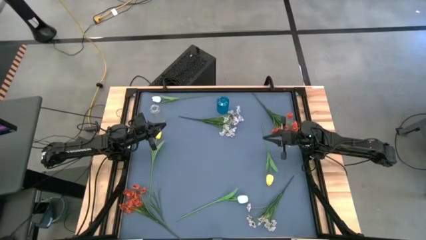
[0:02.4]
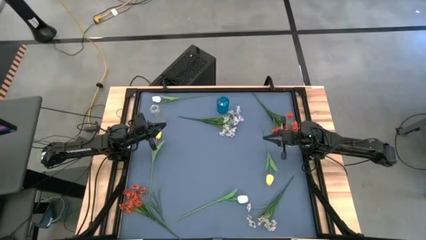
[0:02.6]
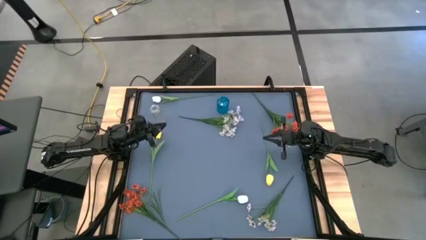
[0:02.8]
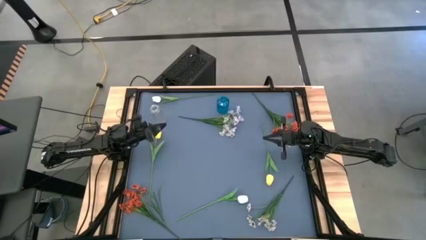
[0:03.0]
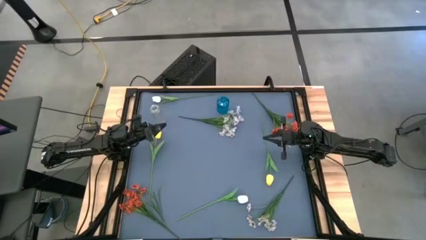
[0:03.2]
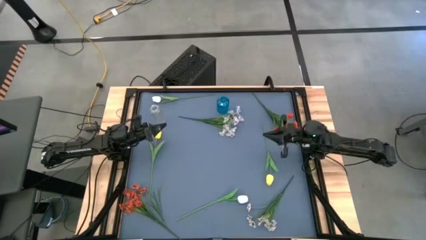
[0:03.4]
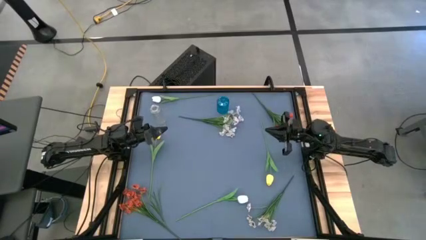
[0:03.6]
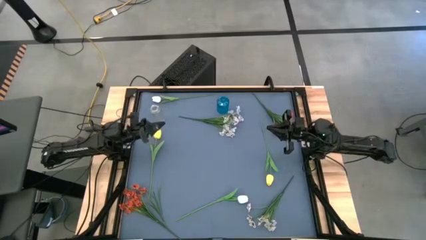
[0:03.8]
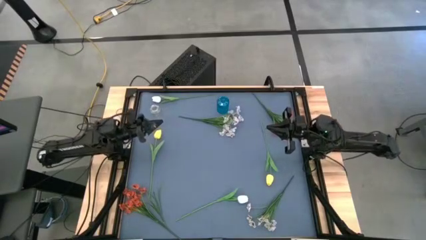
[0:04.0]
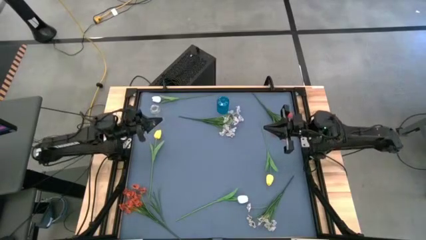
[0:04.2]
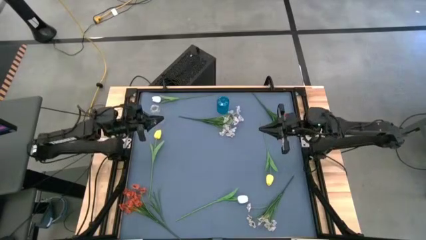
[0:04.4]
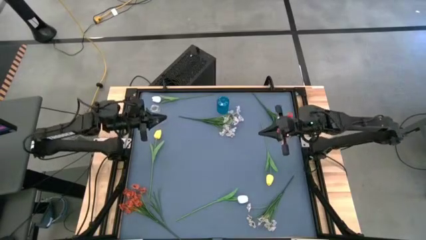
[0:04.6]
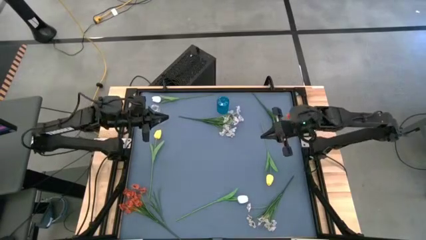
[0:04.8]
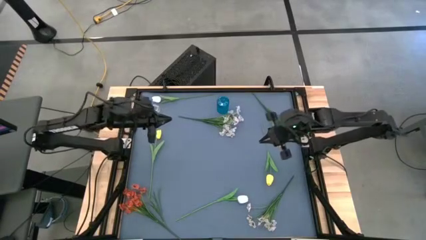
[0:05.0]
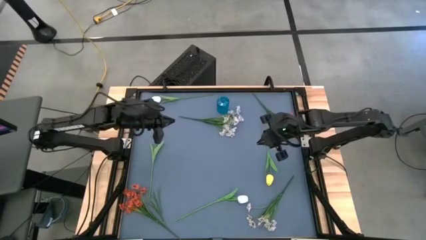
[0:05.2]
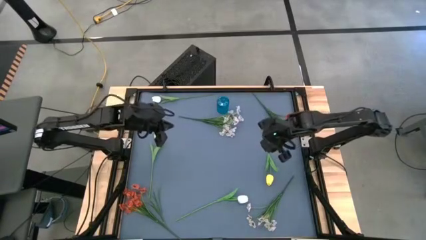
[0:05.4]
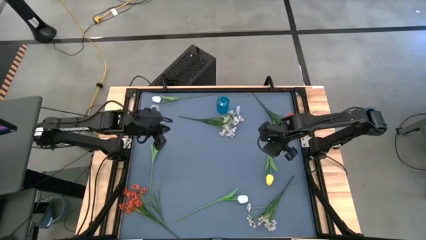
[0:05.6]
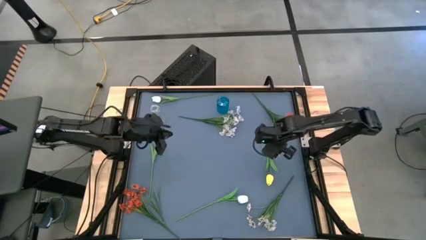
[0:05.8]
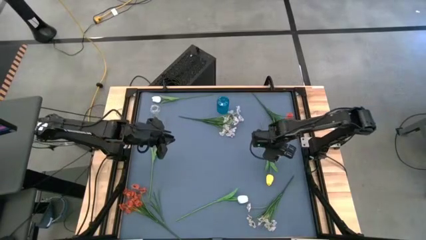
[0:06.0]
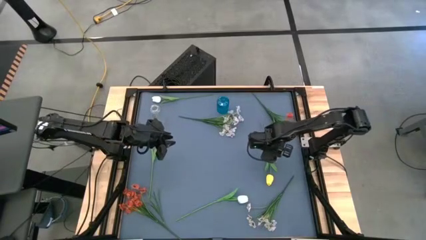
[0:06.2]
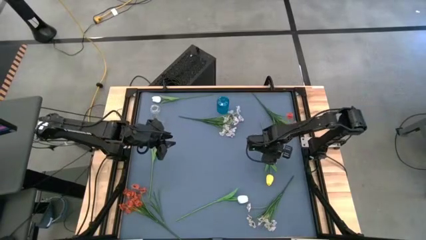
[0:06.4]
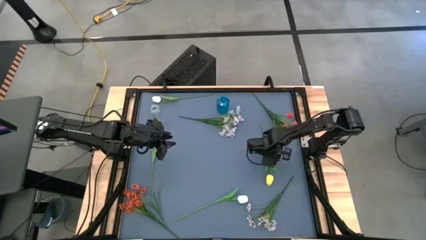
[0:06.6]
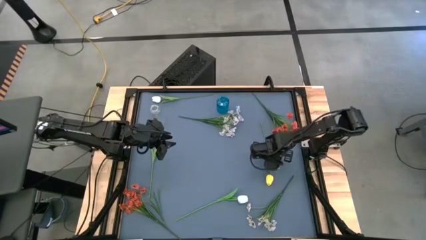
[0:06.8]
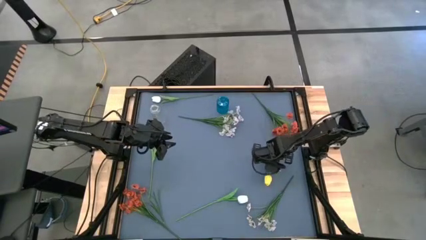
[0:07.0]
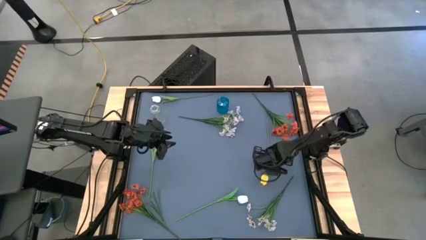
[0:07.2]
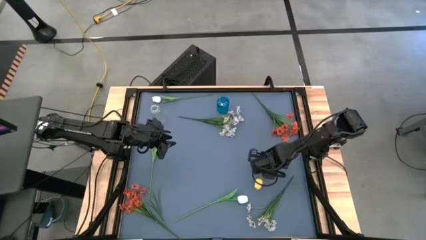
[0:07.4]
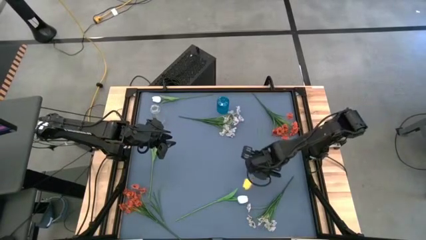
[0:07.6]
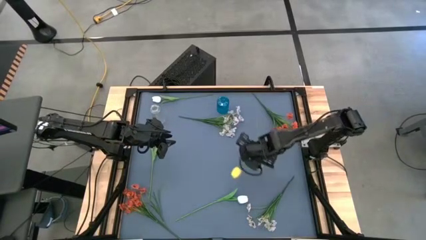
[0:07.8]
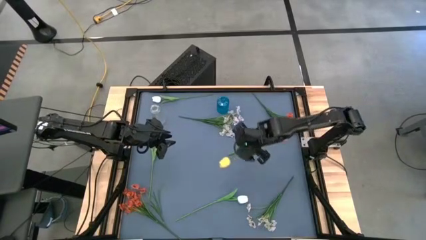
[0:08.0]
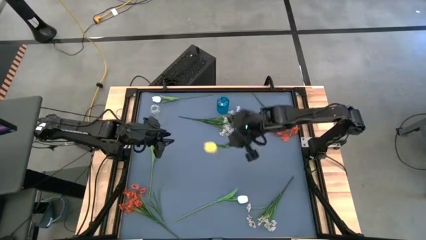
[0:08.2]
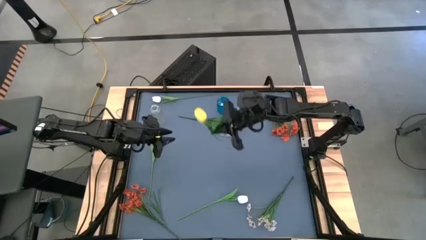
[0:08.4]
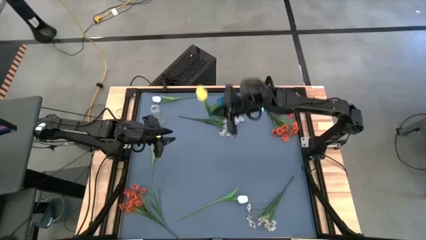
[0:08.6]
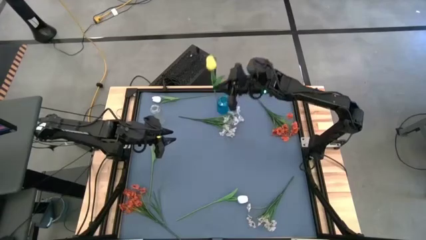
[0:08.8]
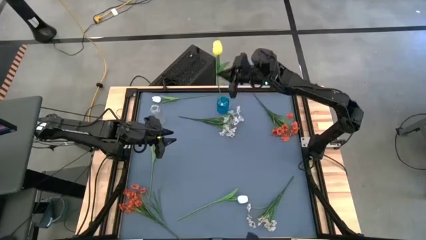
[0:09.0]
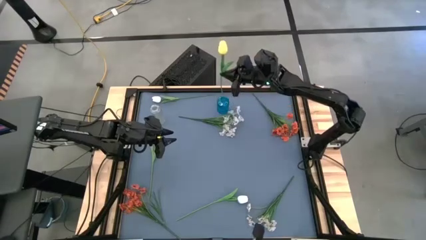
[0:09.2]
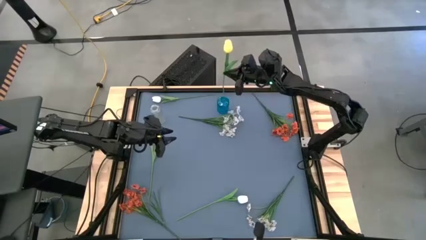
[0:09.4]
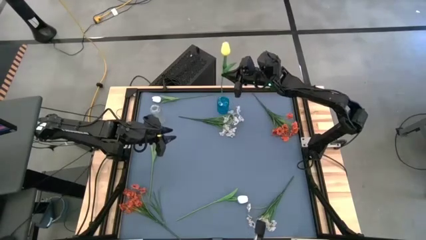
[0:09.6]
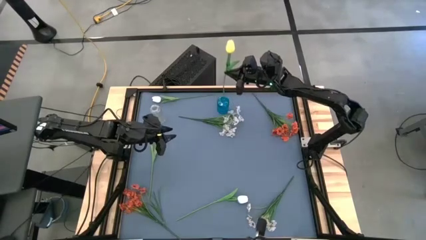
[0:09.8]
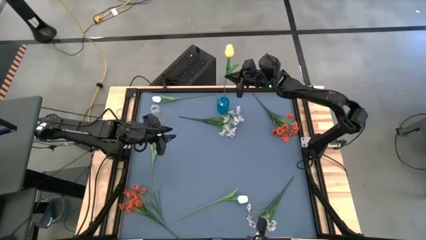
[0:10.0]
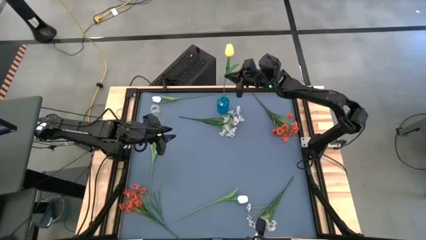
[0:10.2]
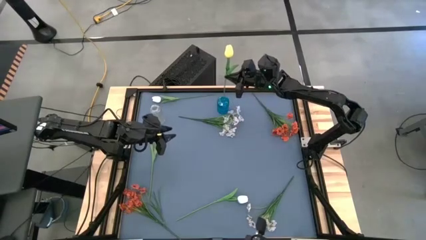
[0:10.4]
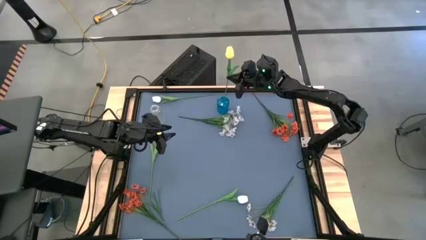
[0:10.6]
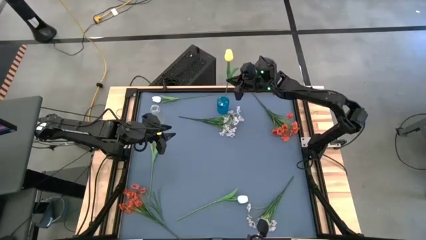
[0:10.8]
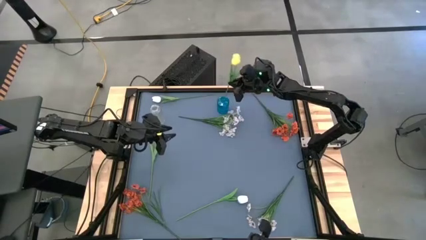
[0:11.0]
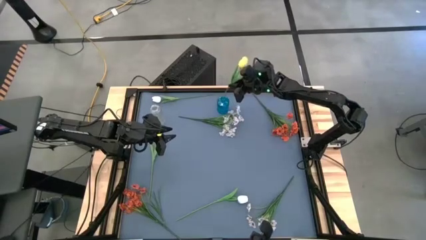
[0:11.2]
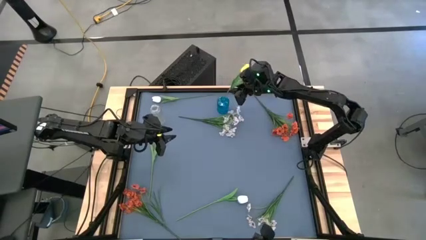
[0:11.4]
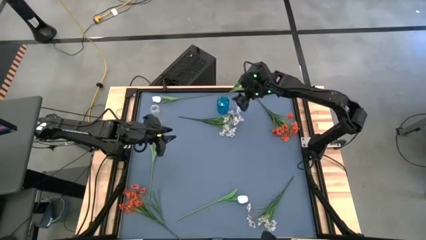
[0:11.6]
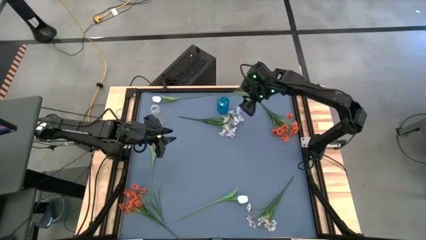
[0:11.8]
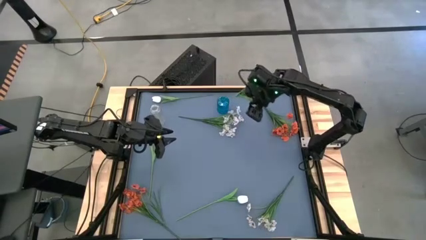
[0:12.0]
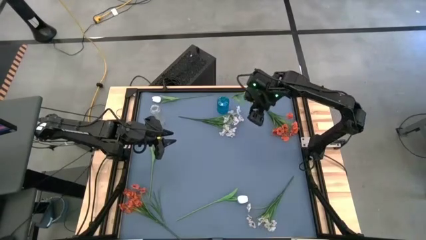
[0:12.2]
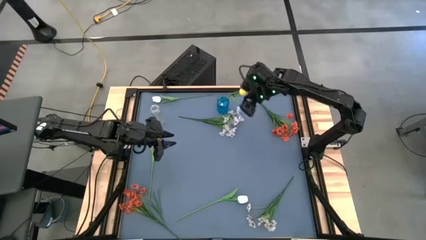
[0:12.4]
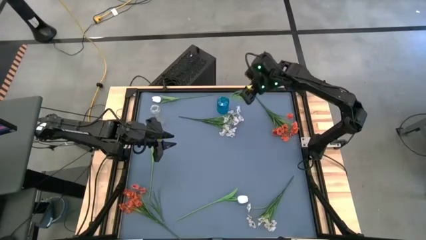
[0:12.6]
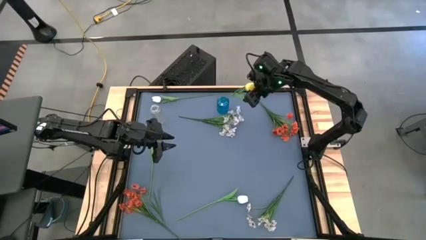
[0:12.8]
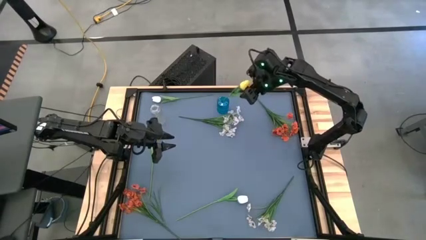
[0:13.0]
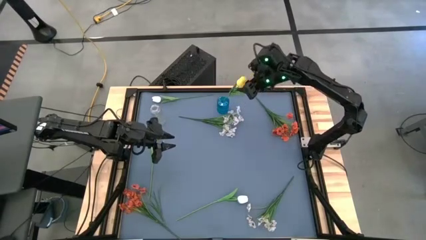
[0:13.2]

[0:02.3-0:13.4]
Task: Sort flowers into vase by color
Put the right yellow tulip into the blue vase

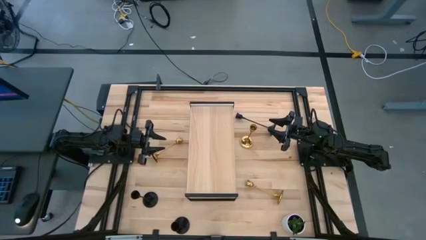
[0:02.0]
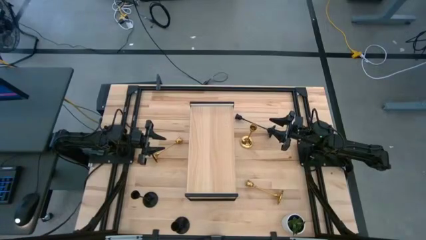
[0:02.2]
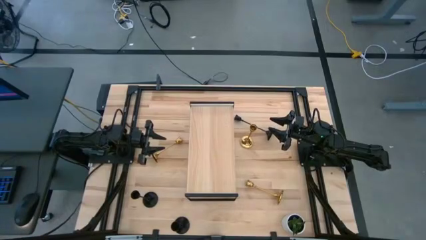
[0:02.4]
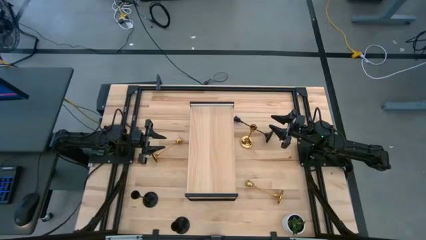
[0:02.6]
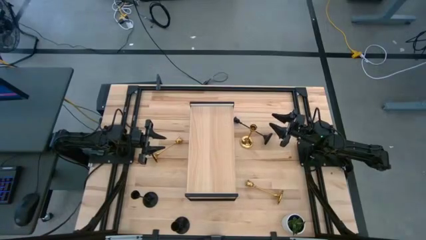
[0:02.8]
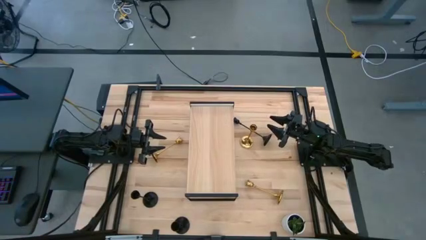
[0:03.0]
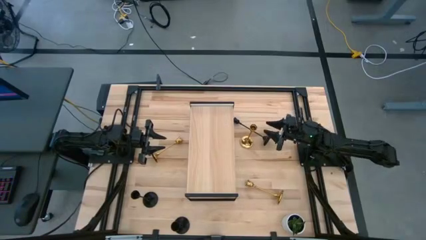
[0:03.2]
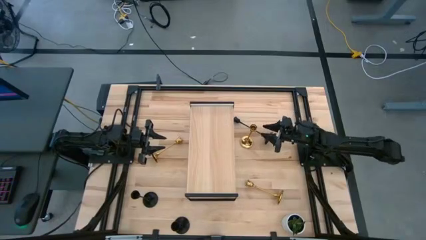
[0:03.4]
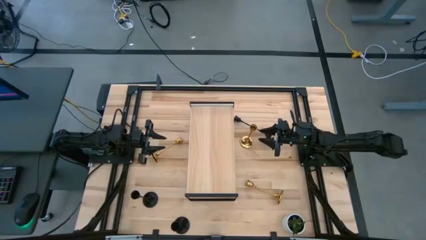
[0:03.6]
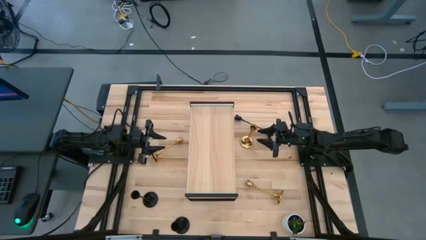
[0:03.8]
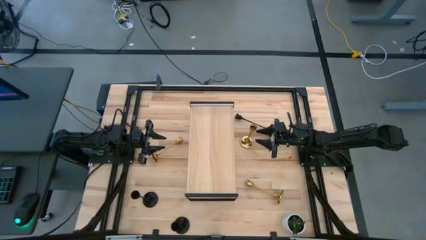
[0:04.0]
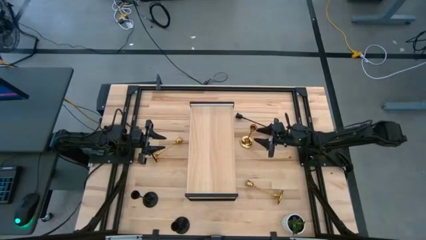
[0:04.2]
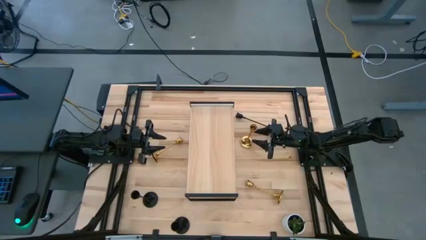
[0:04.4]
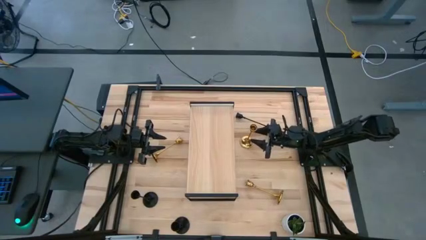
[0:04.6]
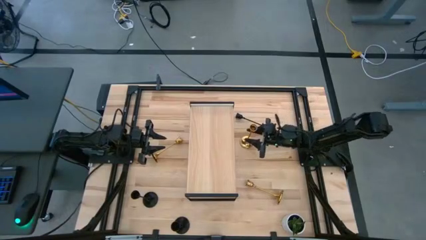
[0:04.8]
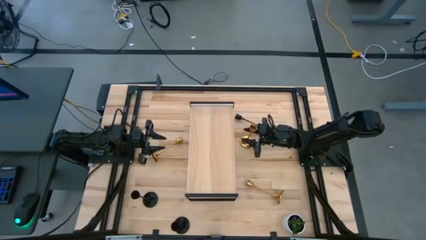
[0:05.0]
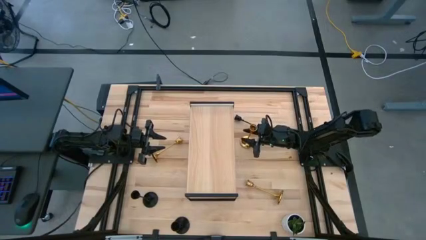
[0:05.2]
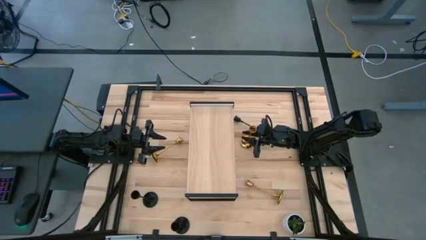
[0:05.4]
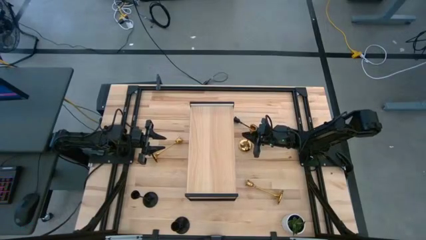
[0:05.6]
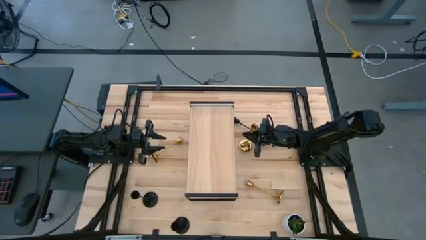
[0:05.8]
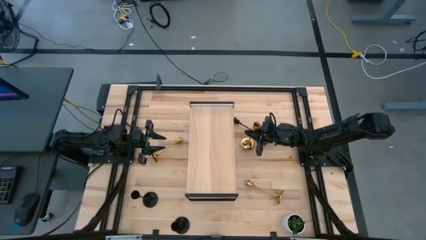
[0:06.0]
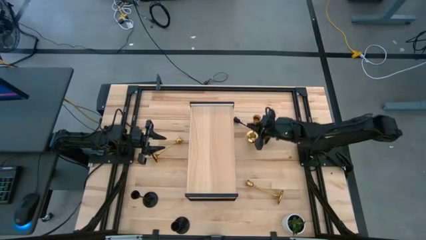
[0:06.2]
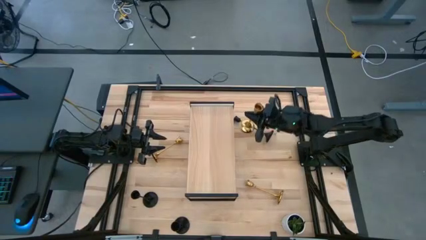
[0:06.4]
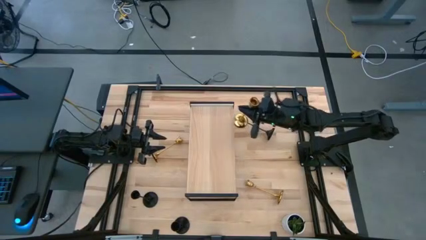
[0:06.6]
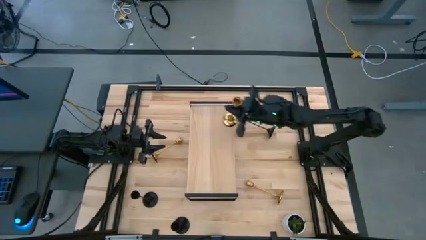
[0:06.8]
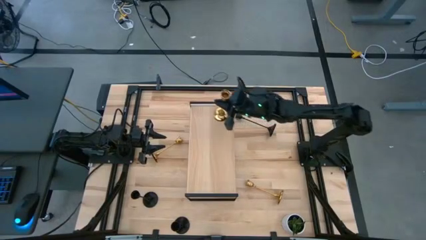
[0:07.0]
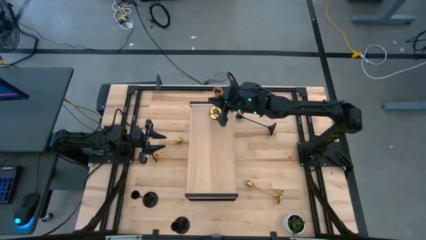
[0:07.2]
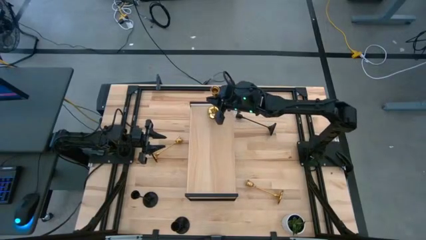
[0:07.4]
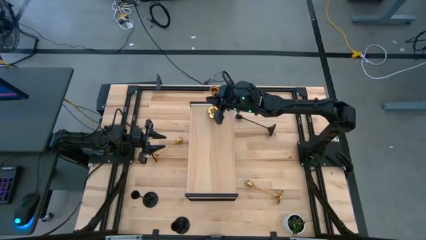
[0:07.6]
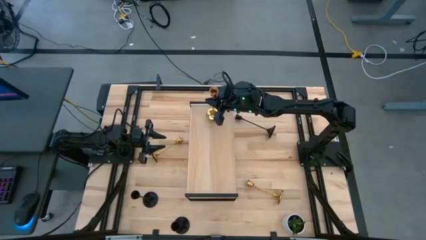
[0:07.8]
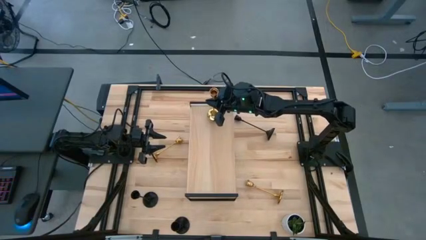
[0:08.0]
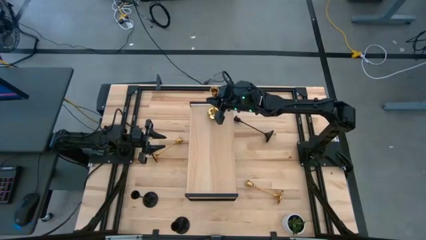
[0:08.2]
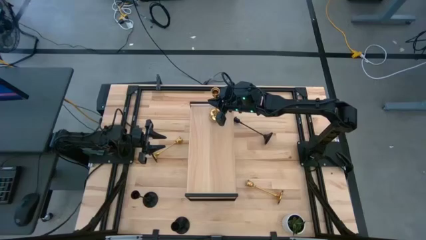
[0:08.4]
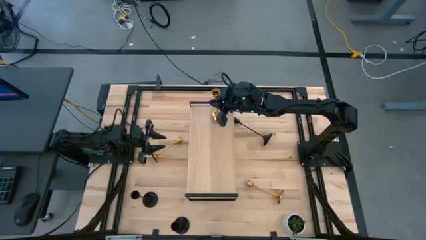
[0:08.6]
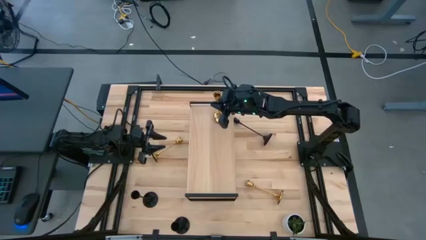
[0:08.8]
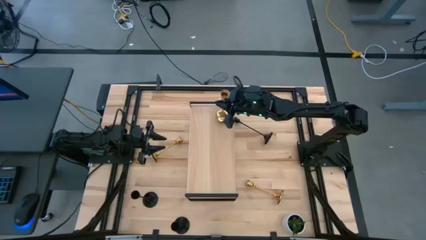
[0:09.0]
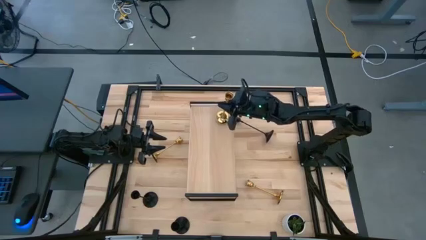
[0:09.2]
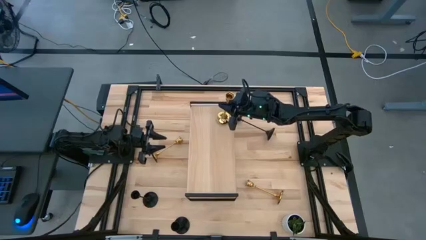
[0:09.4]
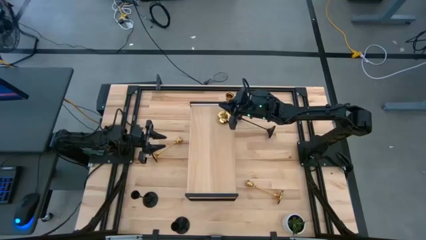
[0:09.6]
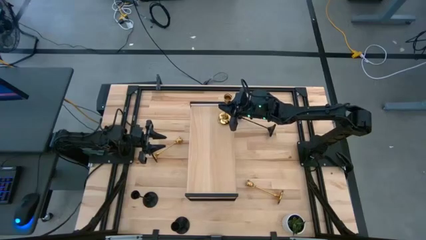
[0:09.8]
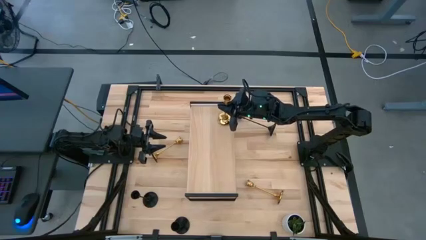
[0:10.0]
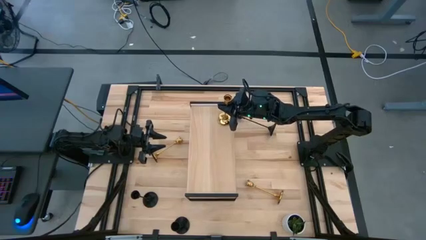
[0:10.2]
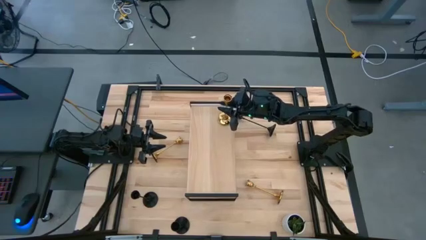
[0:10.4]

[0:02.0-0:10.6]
Task: Pick & Place candle stick holders
Put the top right gold candle holder on the shelf
